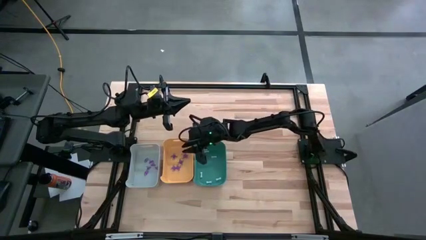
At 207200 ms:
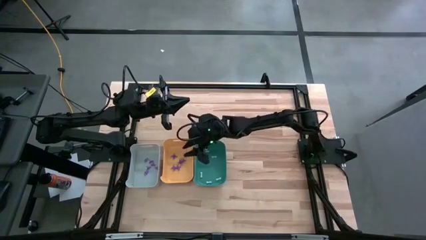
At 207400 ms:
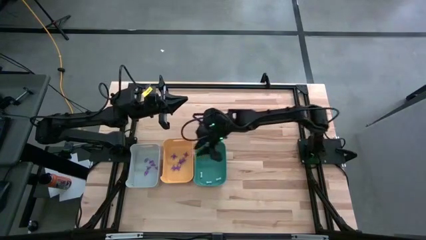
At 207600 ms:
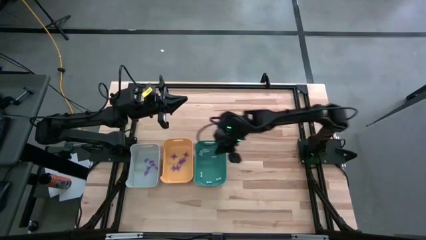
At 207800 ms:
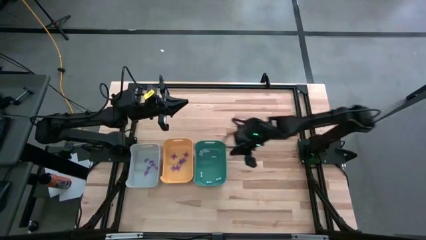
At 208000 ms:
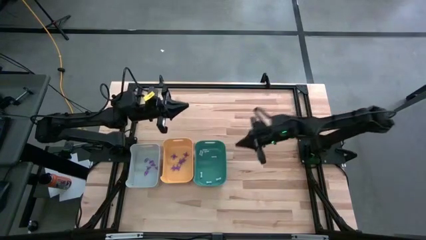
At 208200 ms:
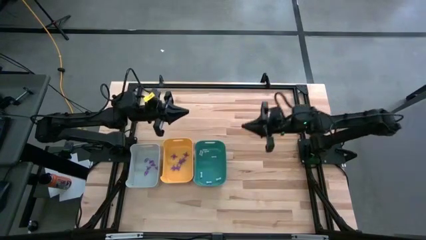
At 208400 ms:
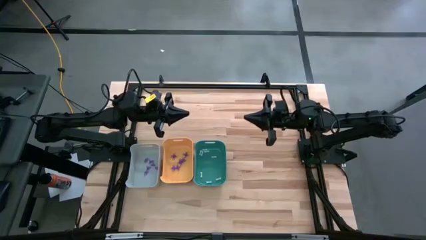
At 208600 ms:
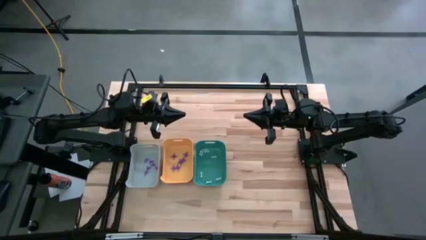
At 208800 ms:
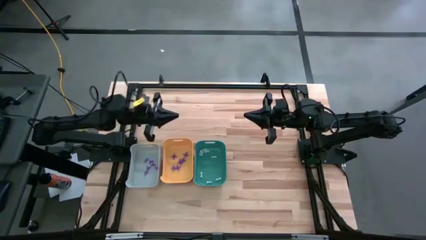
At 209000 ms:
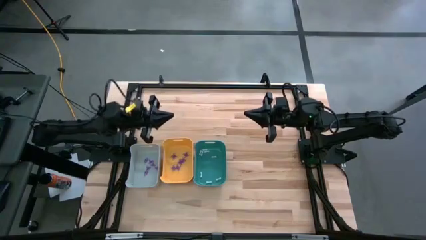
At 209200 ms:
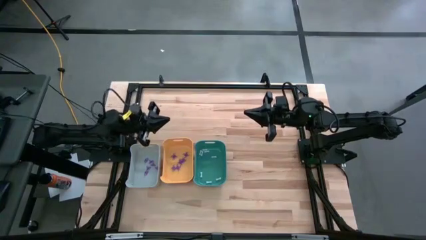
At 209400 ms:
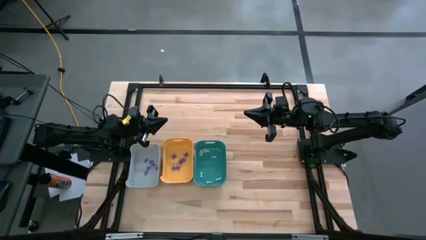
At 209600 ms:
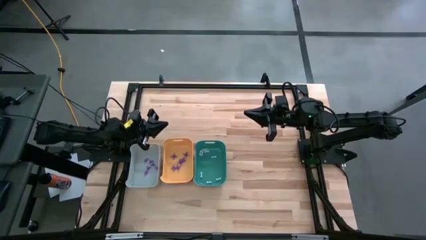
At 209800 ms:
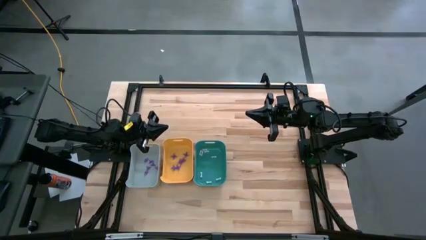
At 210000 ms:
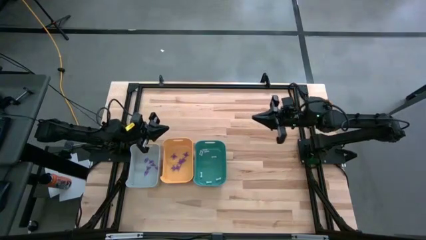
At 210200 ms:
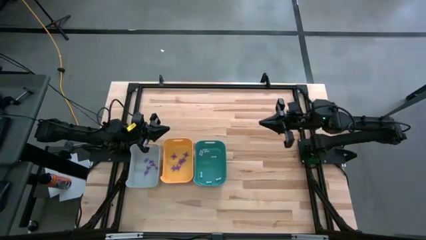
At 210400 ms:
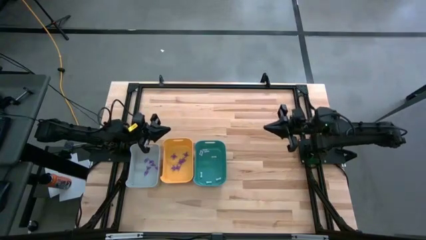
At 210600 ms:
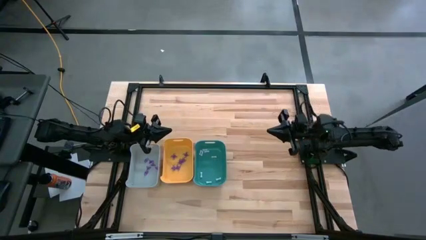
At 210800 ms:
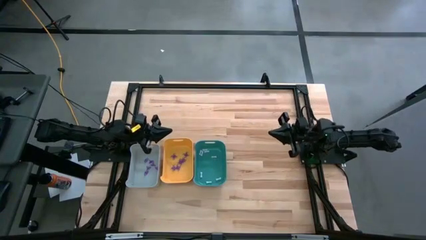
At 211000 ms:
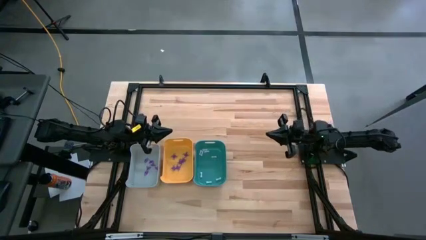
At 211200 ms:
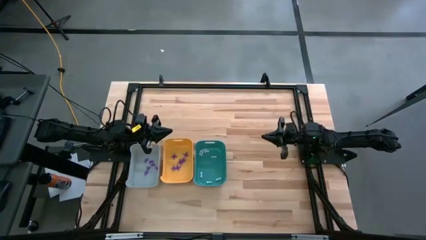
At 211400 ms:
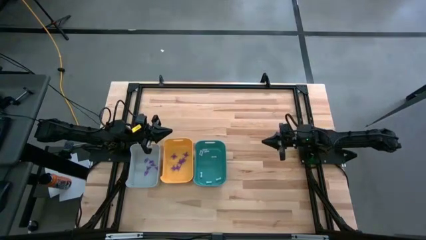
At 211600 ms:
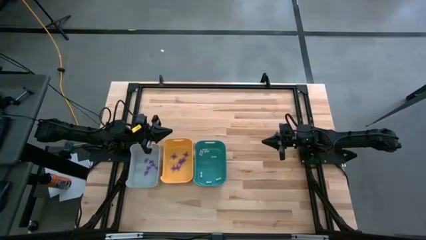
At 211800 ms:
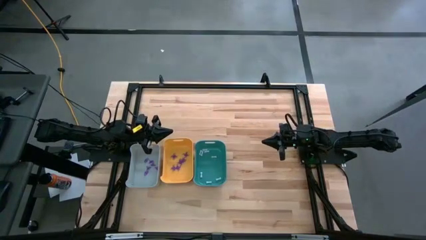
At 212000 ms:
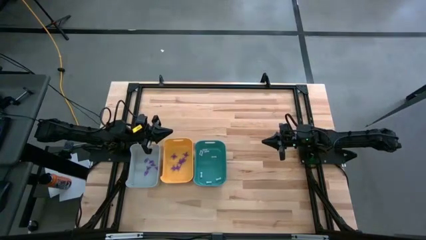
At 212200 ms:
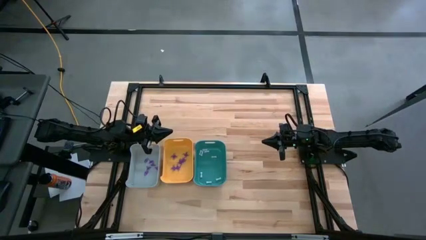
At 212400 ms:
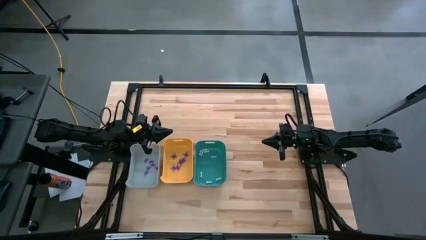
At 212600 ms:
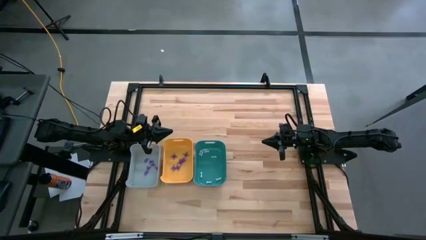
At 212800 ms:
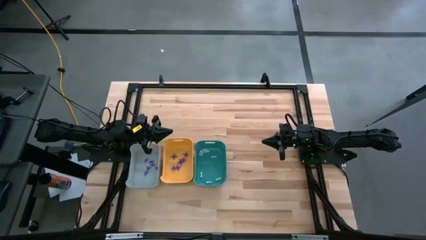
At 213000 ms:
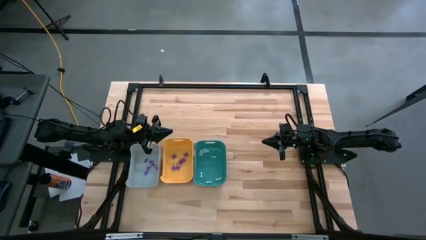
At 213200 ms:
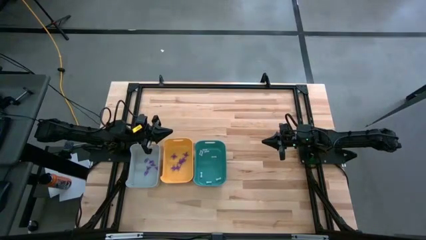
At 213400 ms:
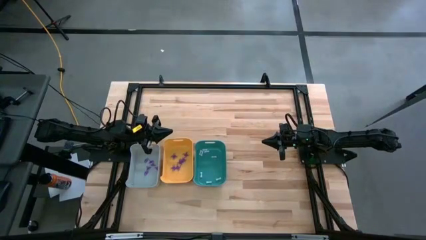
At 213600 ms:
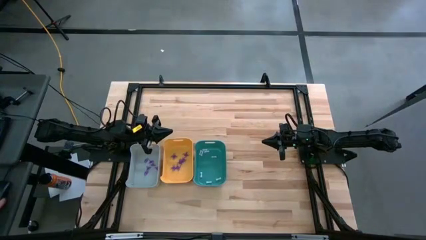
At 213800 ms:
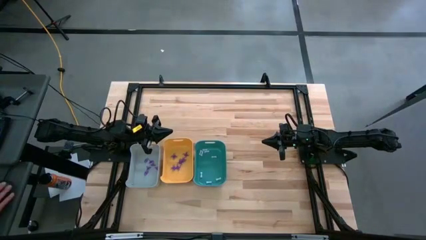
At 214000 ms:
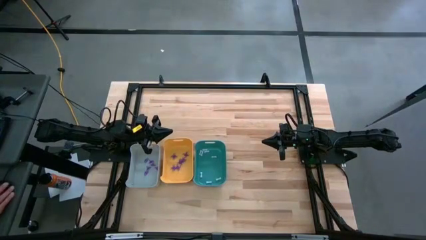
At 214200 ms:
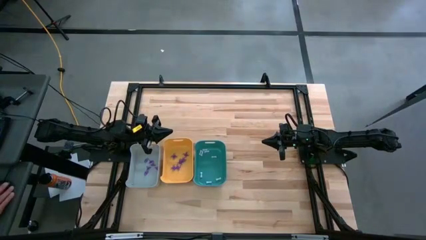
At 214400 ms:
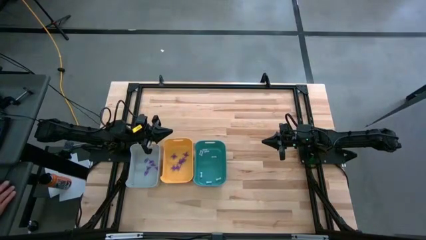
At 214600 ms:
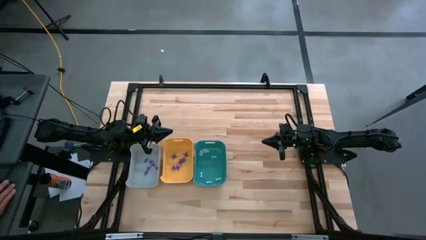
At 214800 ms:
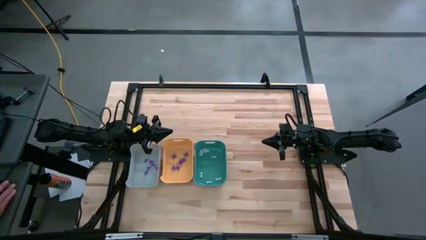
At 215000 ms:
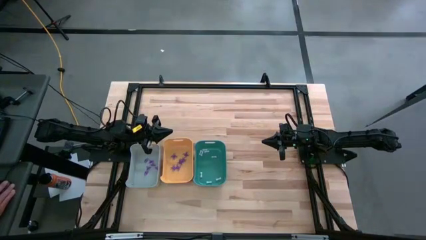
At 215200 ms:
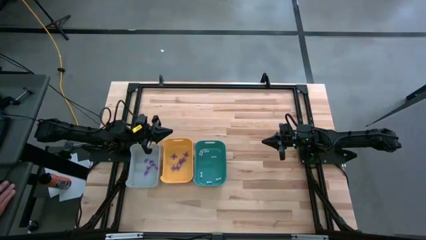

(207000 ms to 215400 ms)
Task: Sort Halloween decoration
Return to Home Position

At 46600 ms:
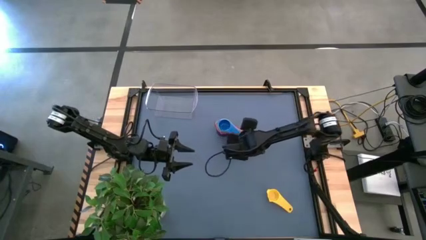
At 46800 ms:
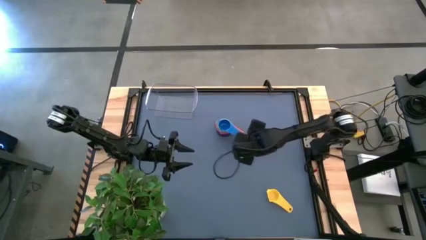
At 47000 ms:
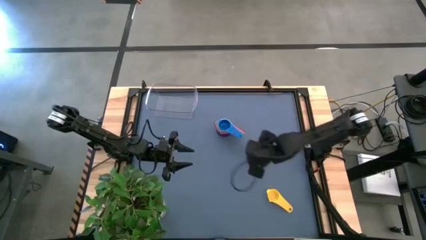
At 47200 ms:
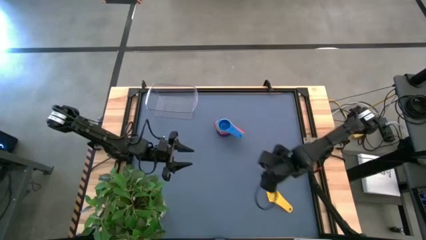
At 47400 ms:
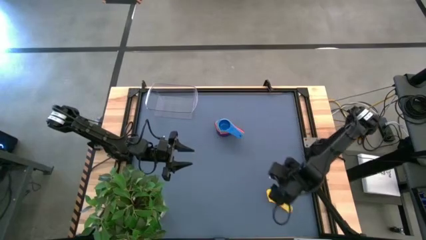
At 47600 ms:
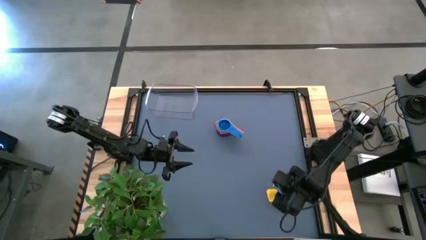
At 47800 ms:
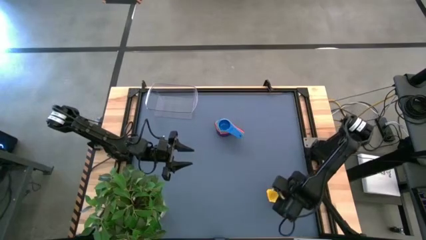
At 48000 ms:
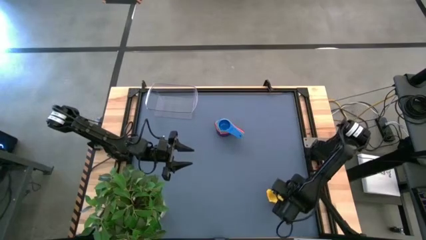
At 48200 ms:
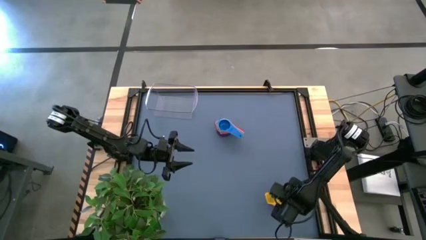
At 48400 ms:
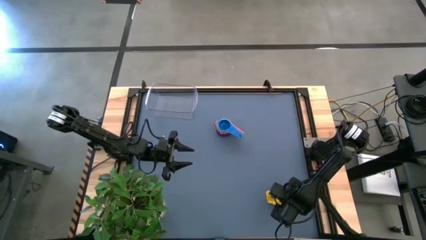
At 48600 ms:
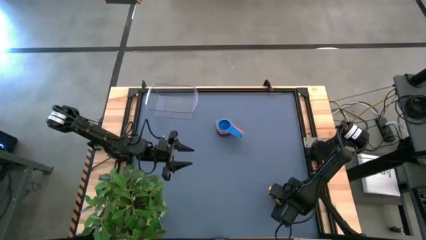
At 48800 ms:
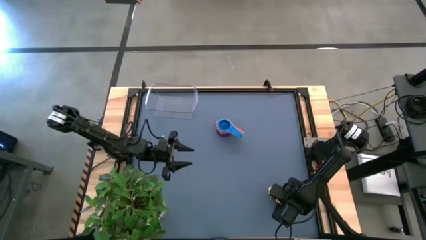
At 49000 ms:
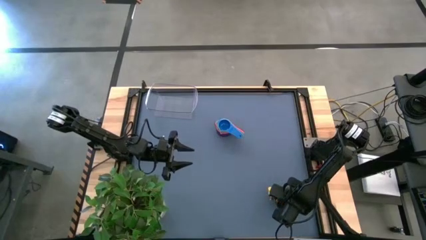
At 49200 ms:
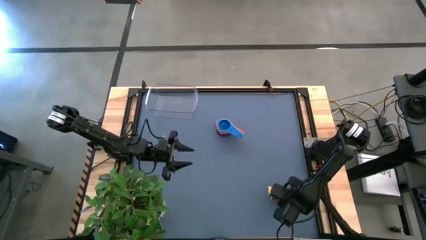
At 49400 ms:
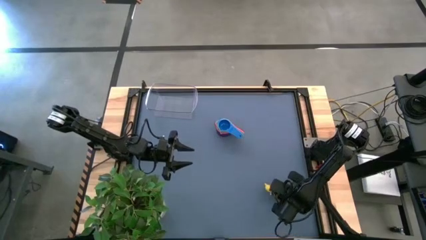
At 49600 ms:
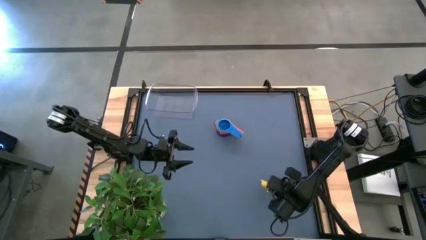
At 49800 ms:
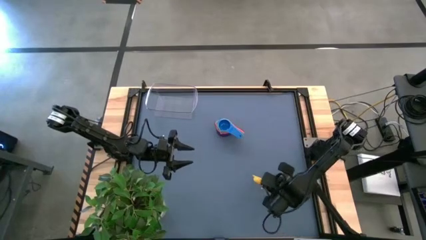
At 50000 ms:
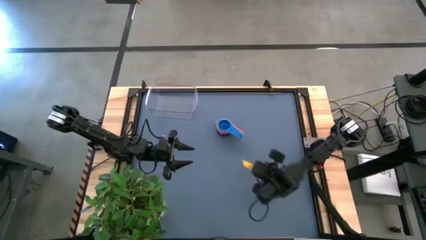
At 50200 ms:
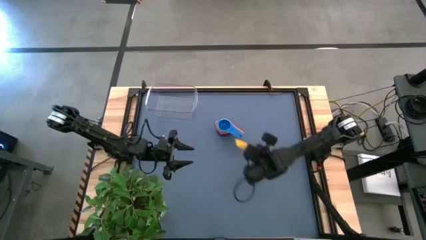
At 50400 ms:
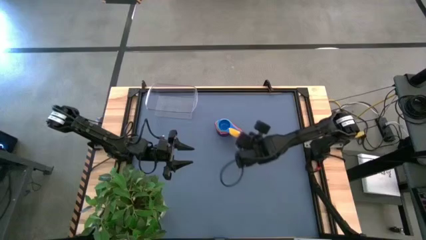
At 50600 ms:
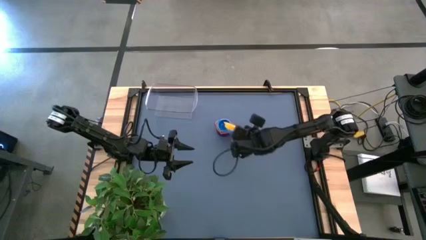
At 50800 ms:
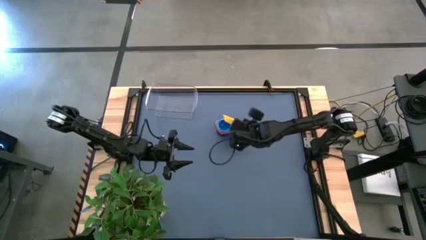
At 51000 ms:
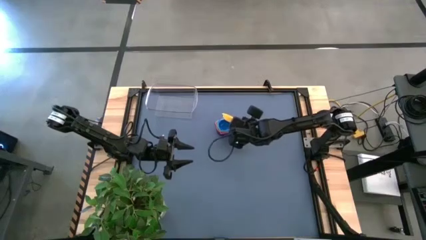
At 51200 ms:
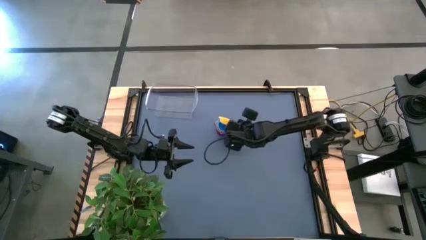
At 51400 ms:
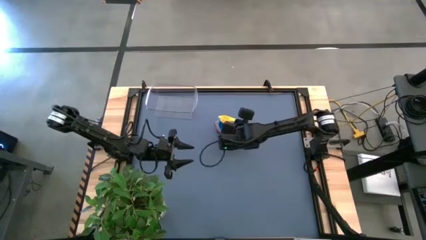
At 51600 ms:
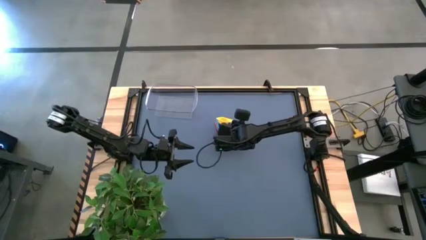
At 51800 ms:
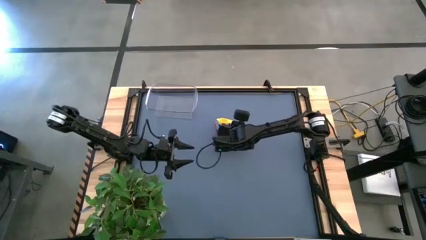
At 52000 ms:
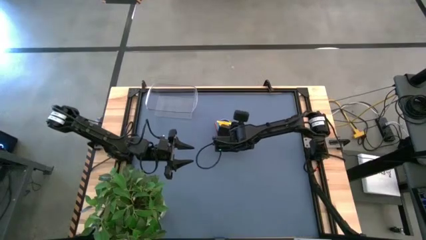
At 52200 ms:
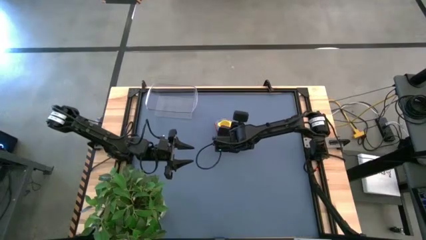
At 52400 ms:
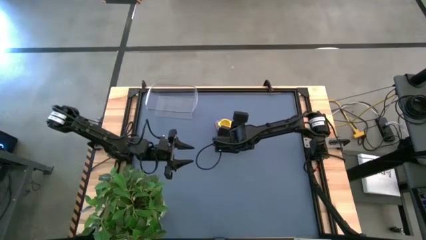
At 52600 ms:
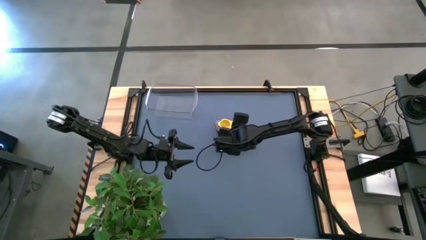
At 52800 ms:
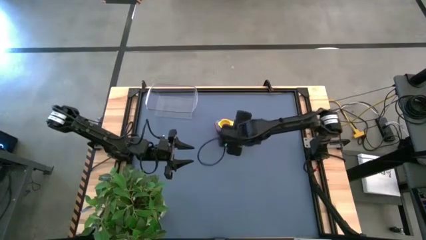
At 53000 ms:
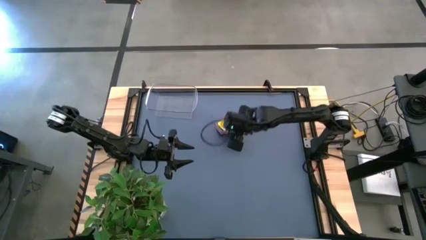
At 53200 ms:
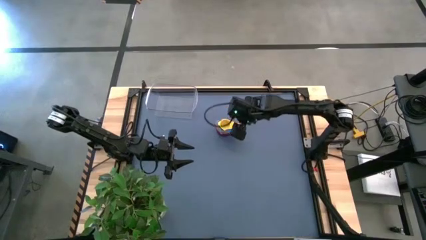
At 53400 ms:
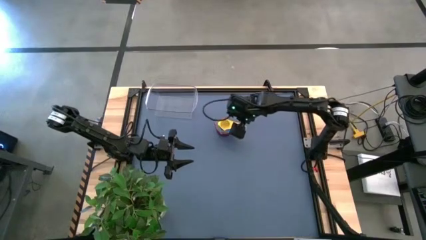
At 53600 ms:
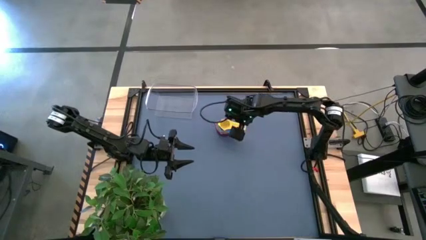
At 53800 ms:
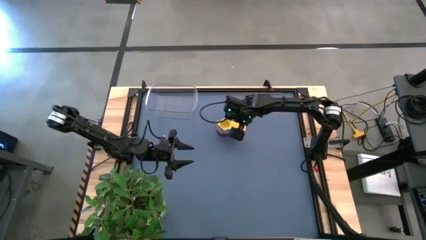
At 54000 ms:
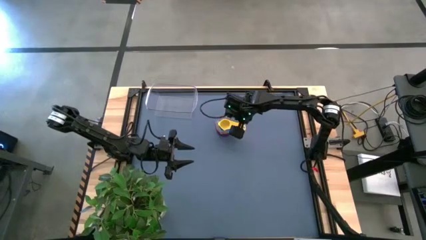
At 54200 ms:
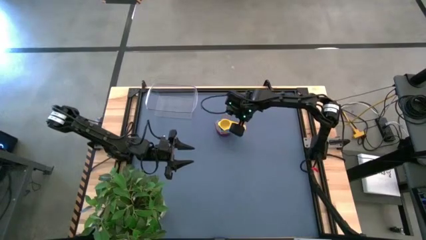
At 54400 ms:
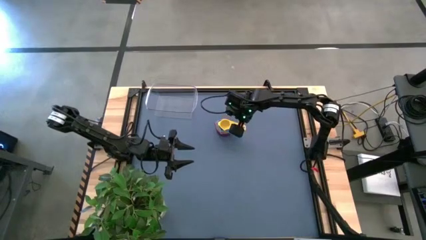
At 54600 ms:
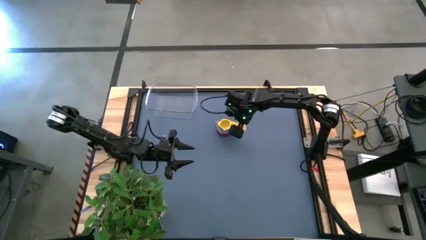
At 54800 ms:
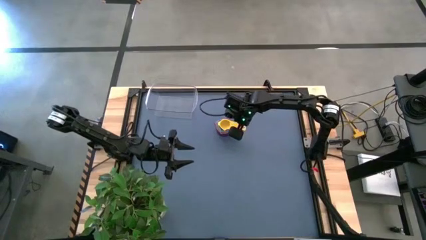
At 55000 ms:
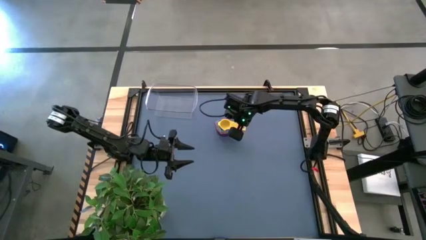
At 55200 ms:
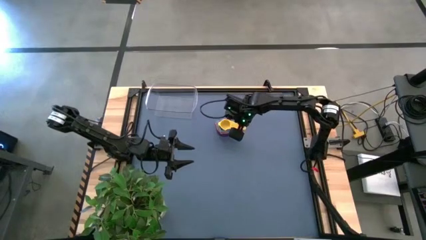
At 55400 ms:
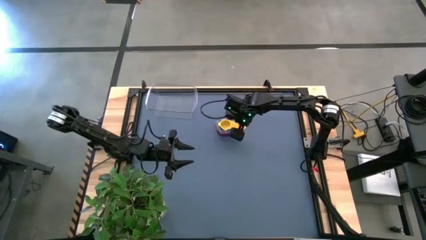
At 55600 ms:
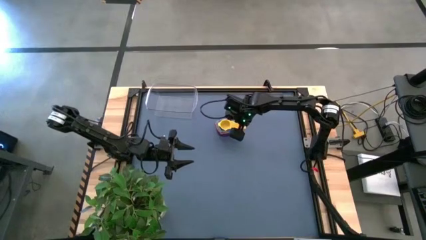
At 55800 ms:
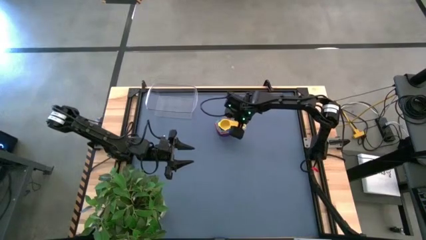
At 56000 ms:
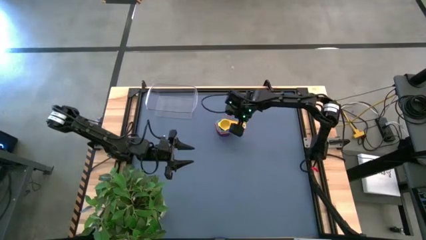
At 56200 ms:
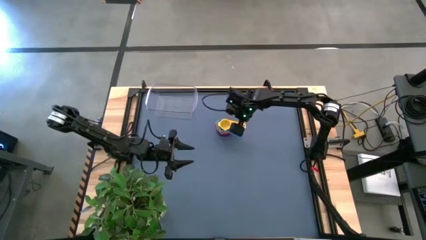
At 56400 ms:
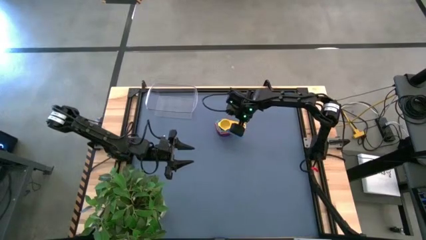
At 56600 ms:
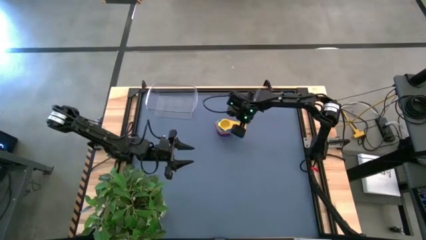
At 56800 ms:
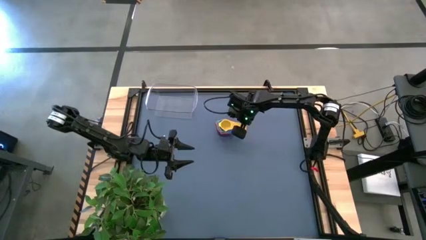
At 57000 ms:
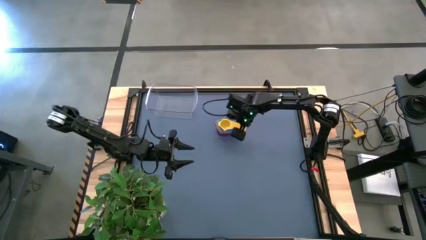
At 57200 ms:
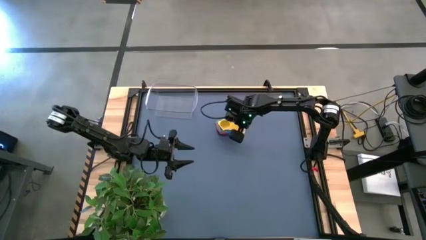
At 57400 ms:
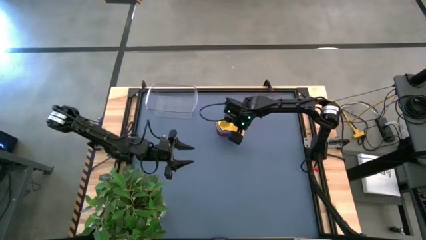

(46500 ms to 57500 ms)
Task: Nest measuring cups in basket
Stack the yellow measuring cup on top of the blue measuring cup
